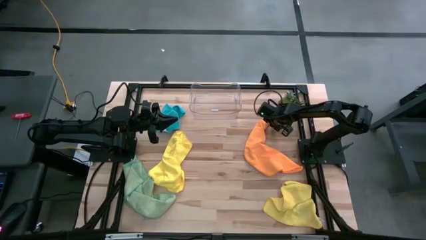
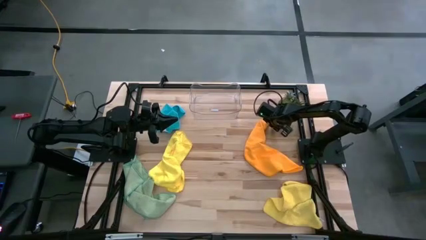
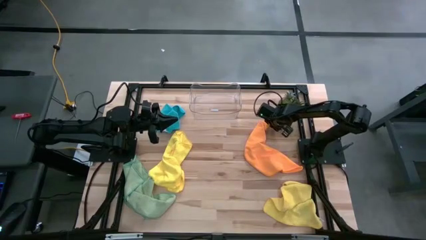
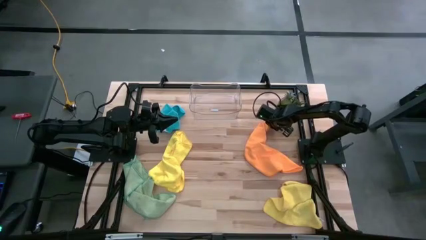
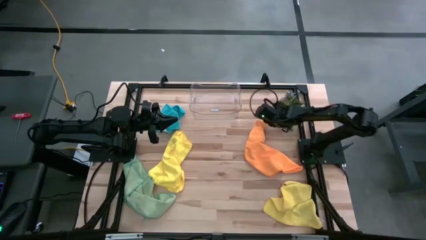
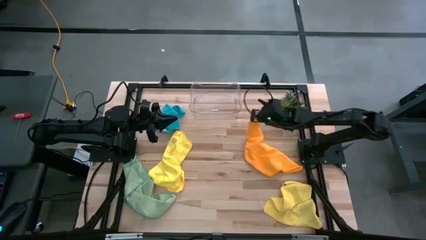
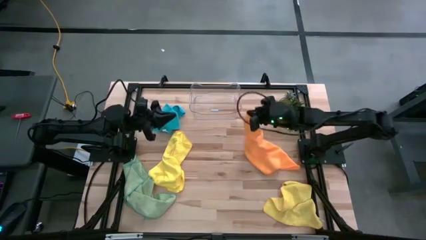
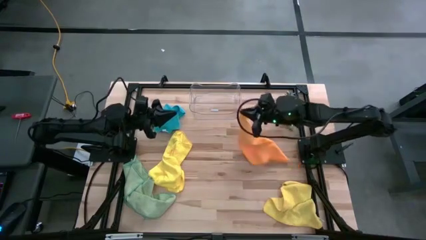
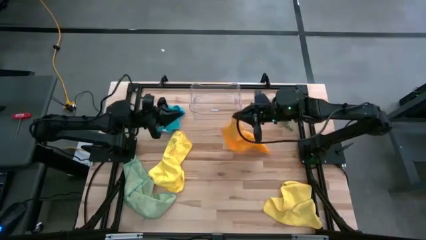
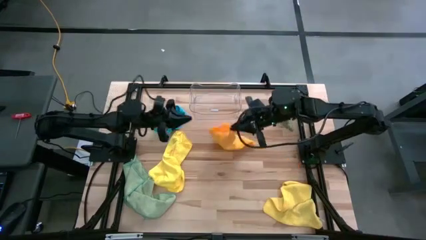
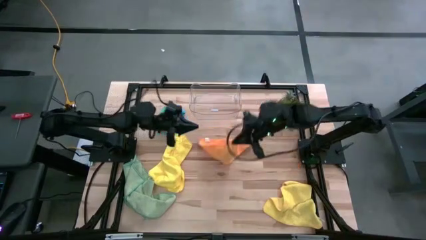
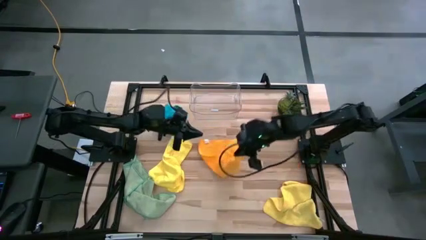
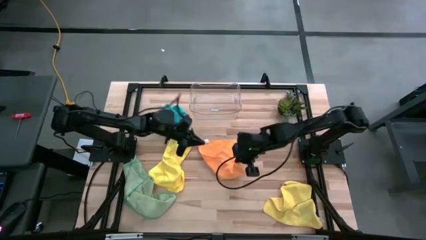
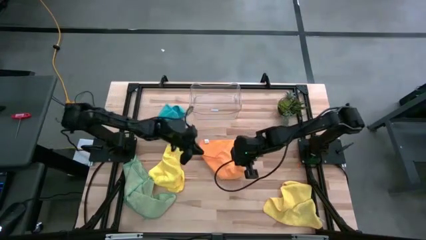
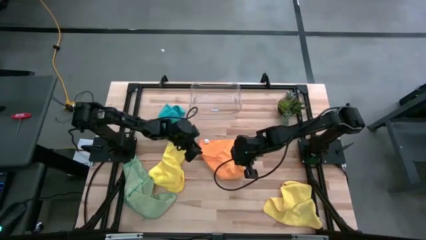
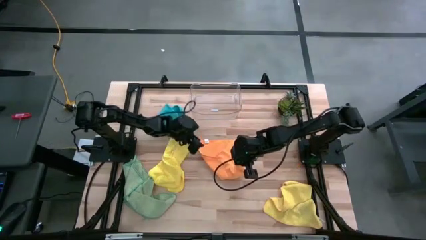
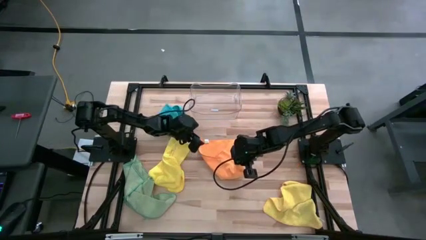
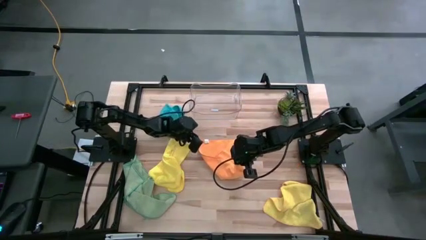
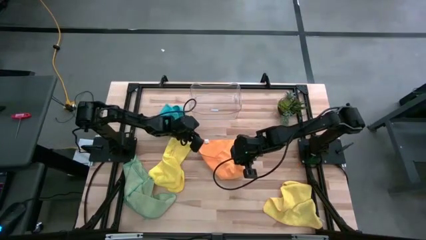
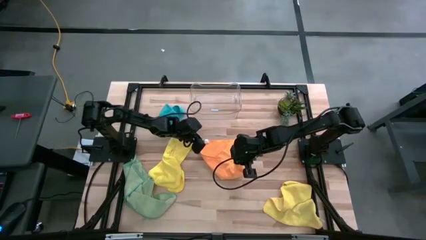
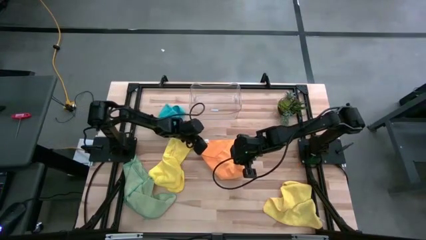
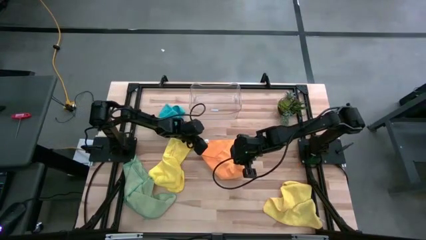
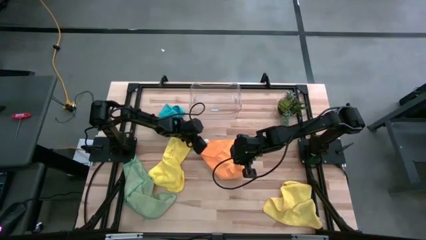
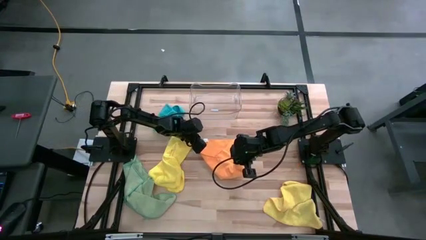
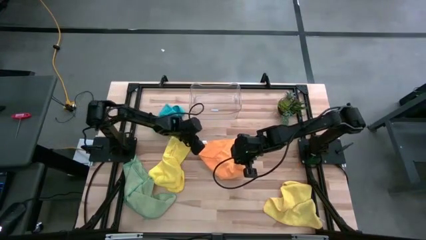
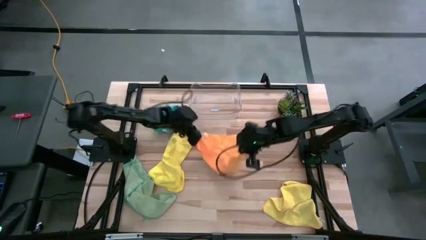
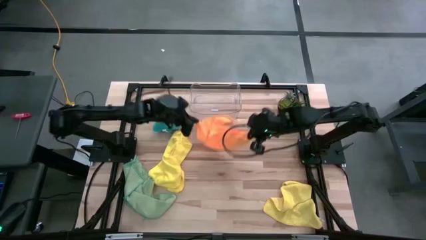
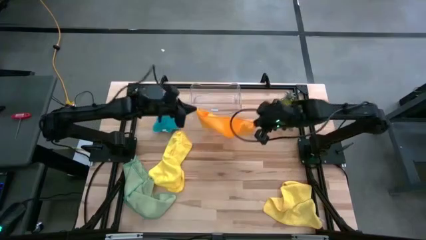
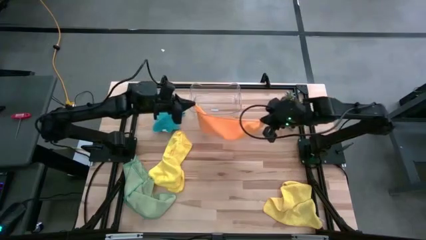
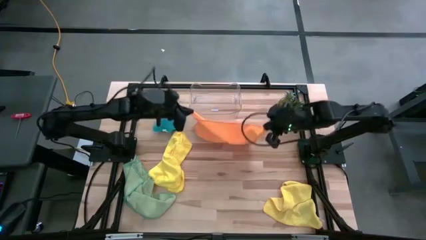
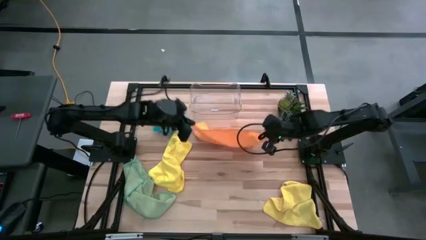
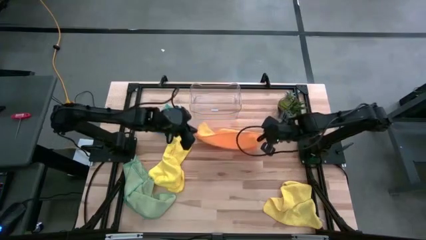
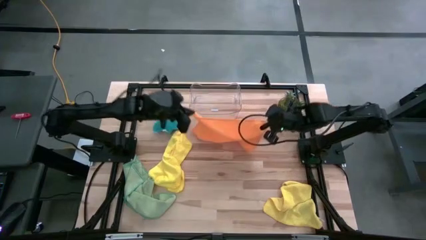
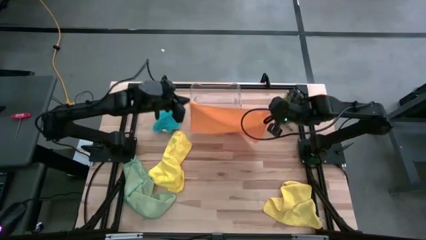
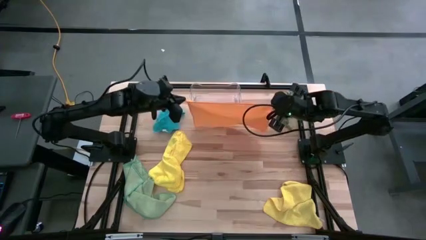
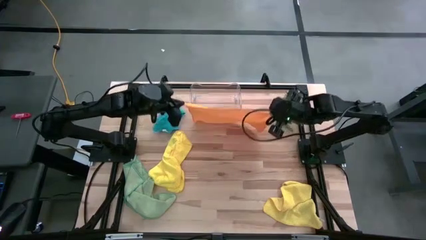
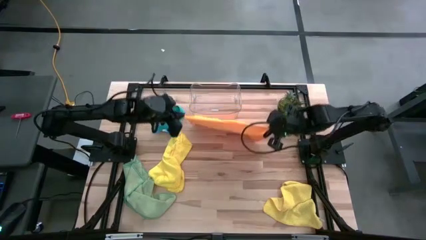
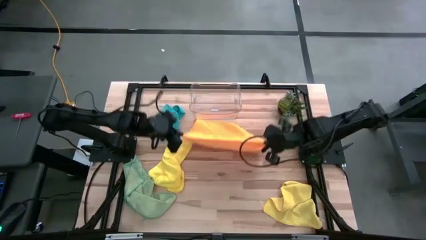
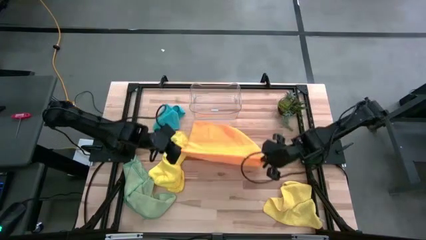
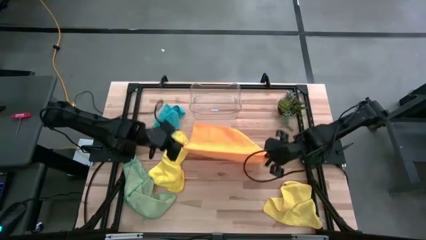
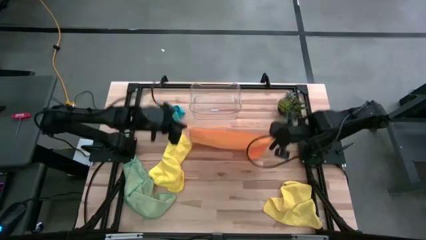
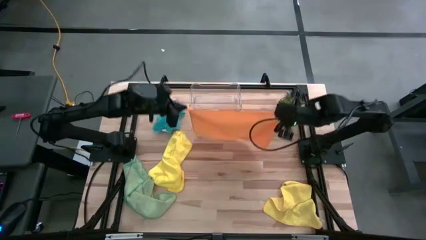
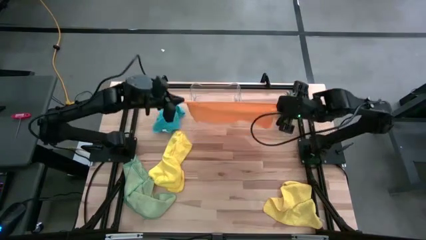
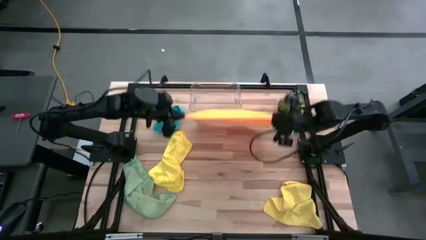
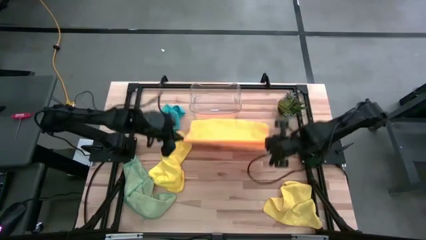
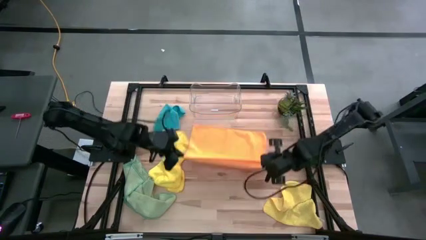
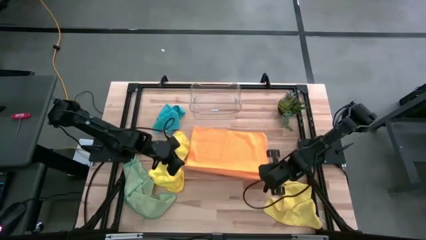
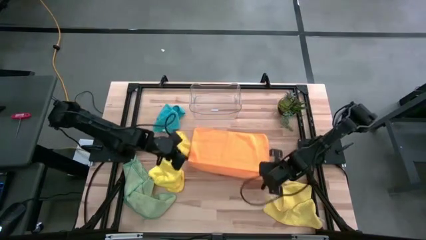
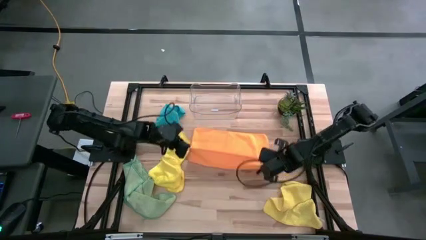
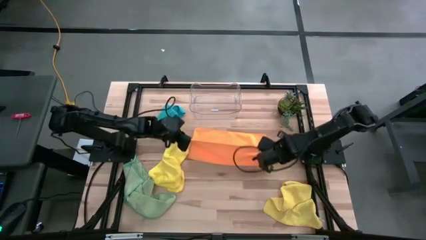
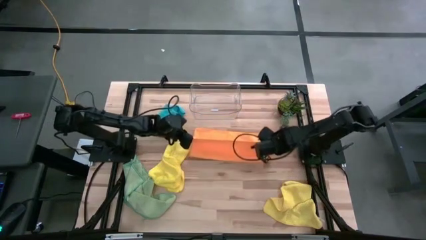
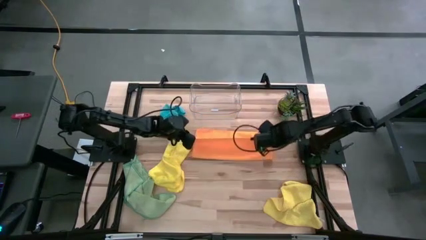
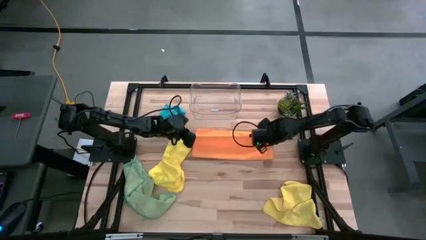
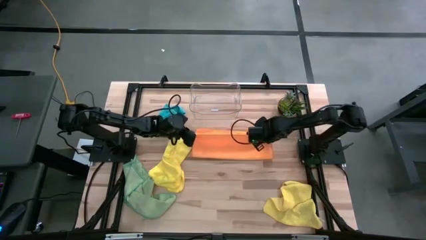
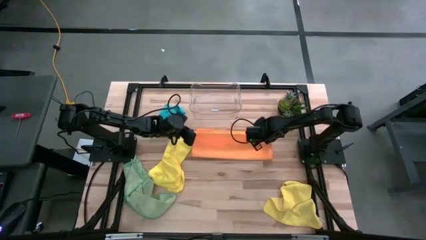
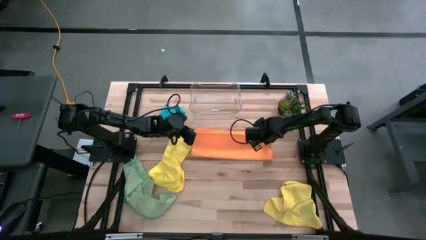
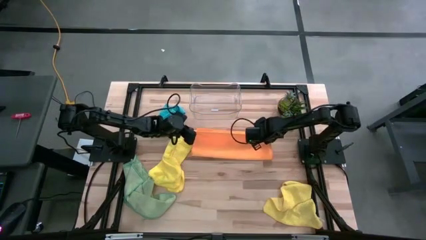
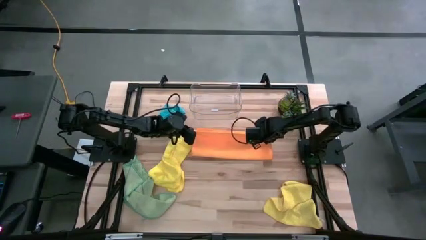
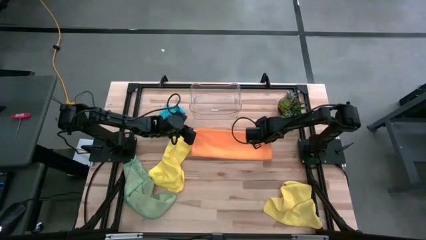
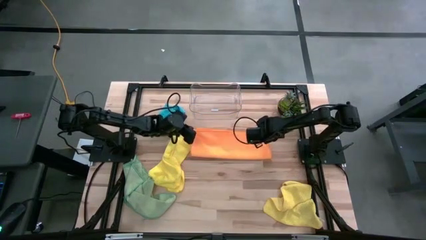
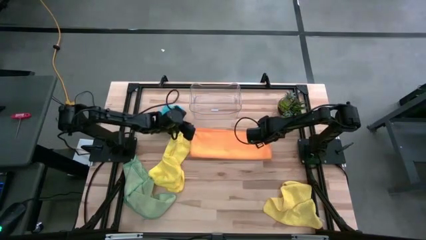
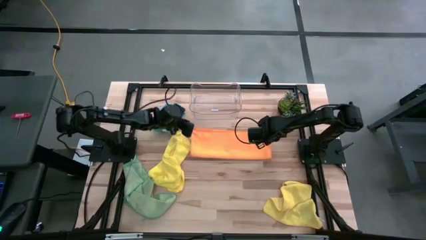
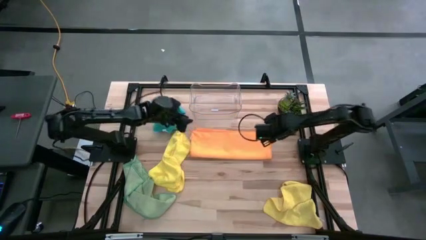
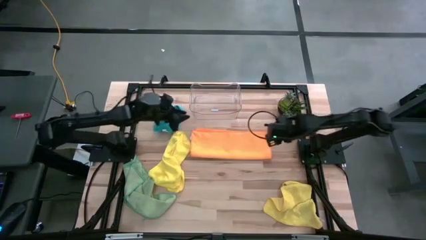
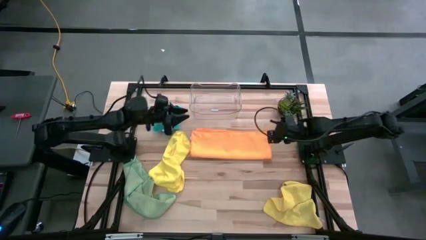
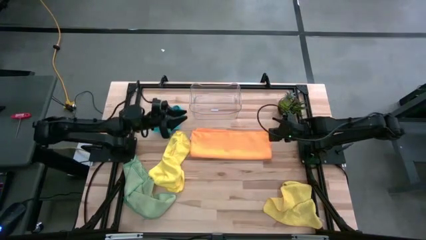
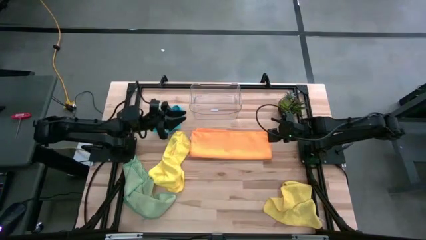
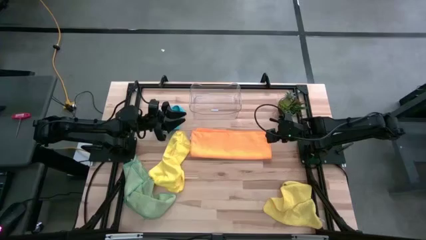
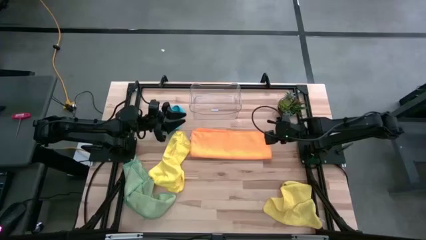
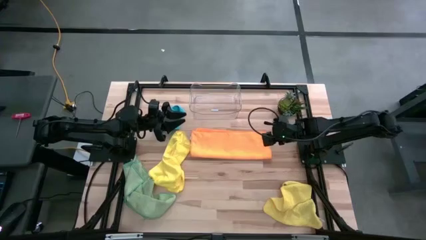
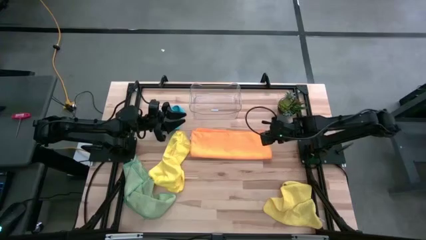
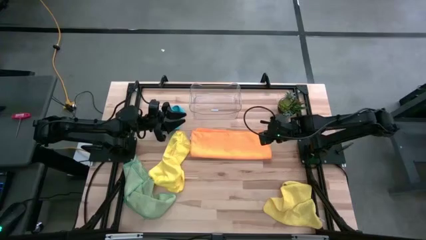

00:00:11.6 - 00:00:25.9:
Task: Fold microfiber towels
Fold the orange microfiber towel

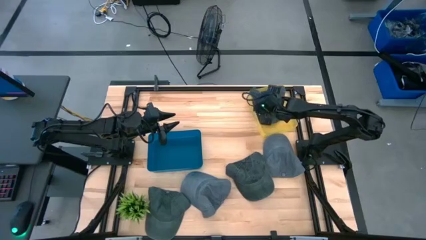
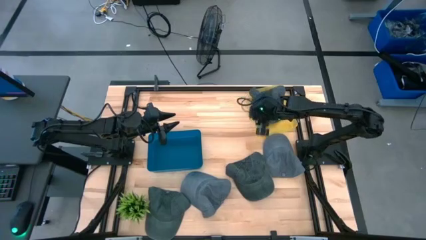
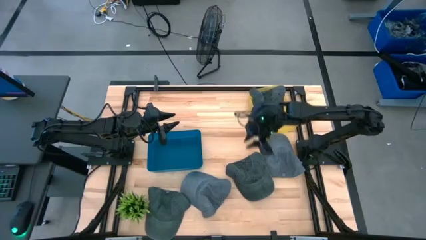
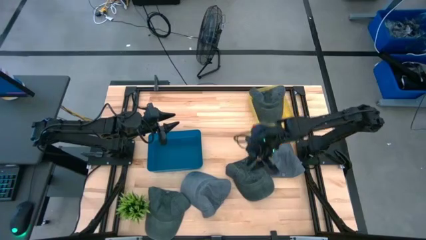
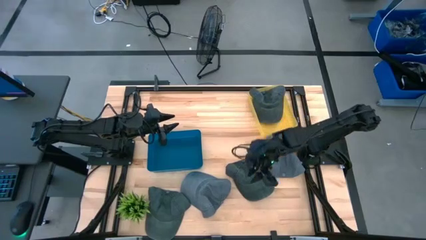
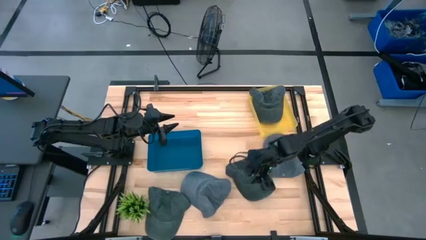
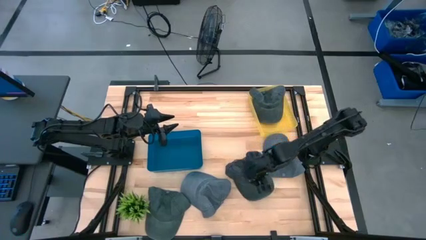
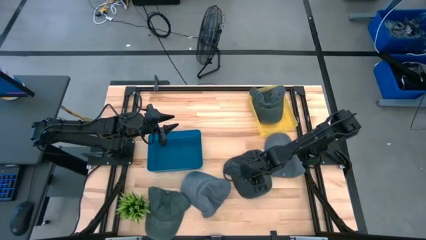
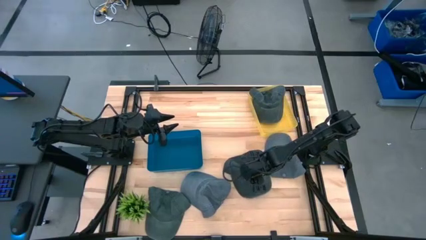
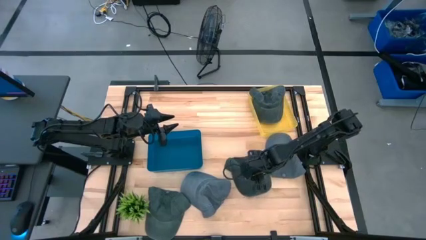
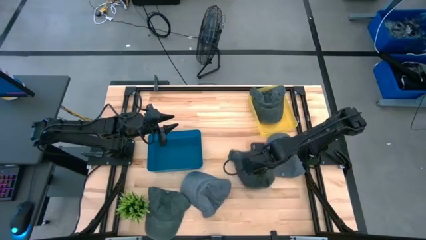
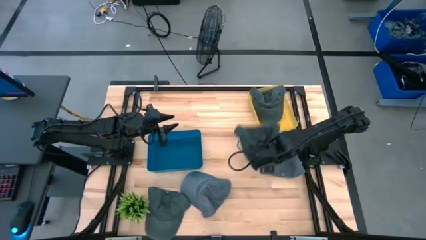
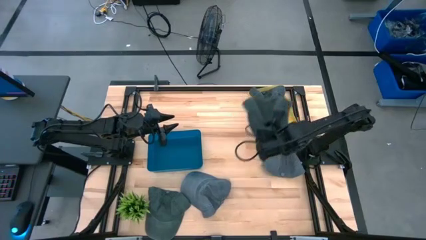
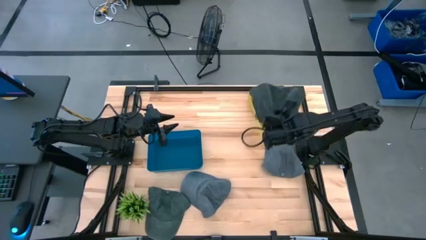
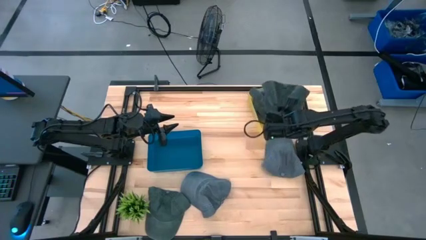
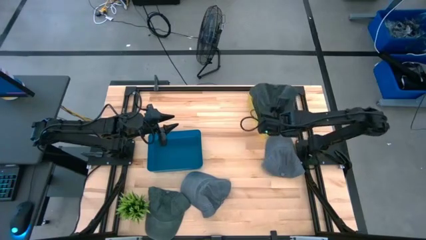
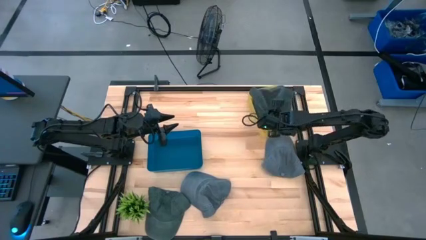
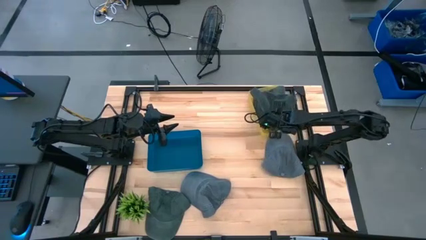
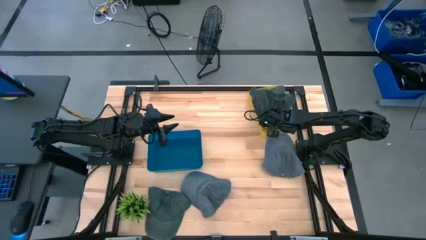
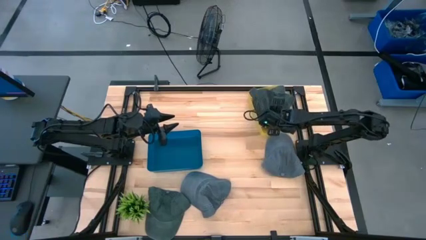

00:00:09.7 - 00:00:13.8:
Task: Pick & Place hat
Put the right green cap into the yellow bin
